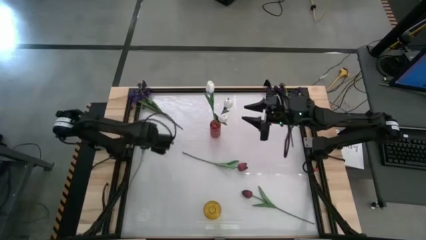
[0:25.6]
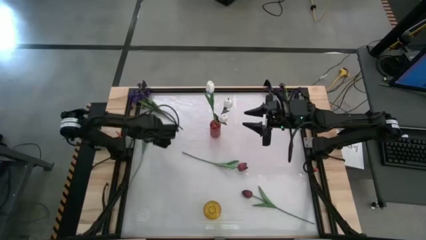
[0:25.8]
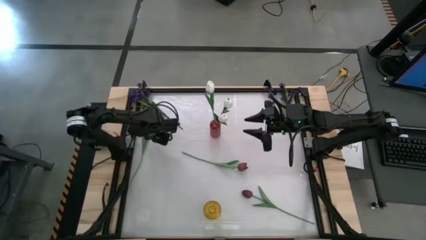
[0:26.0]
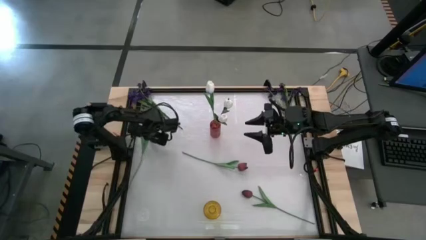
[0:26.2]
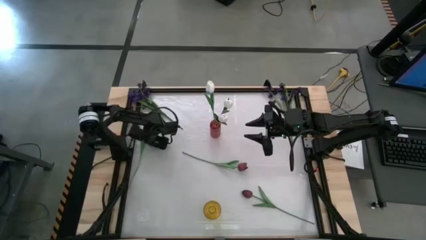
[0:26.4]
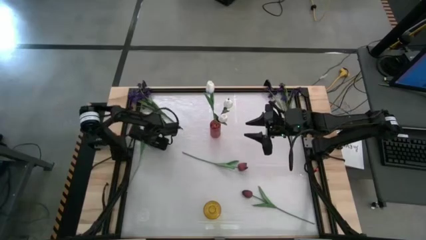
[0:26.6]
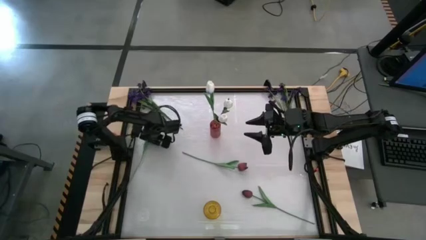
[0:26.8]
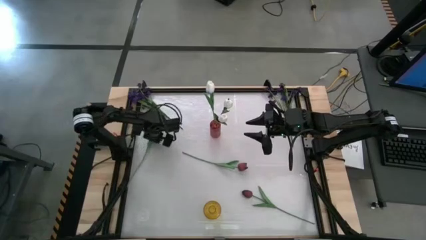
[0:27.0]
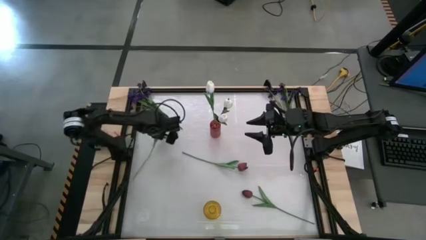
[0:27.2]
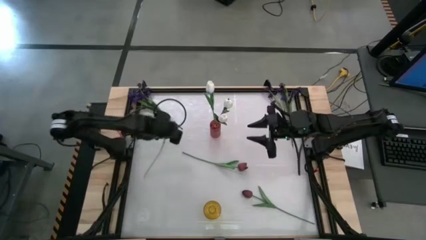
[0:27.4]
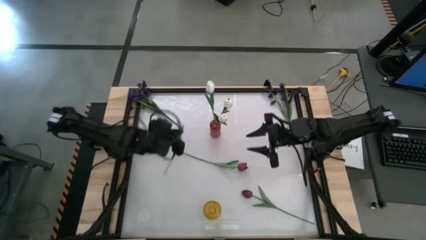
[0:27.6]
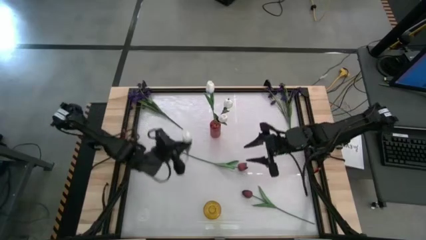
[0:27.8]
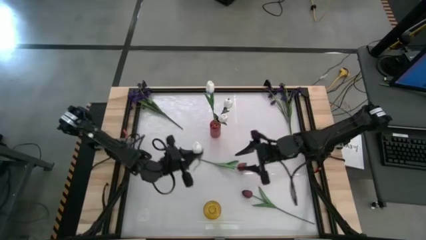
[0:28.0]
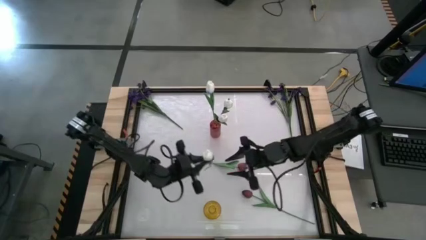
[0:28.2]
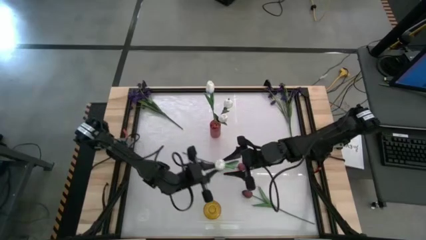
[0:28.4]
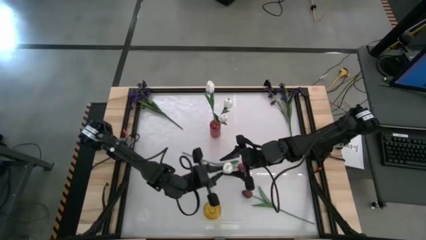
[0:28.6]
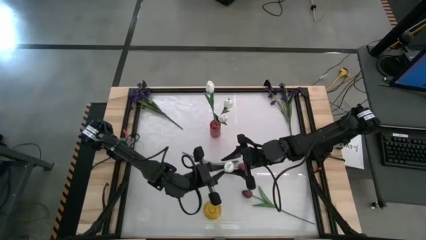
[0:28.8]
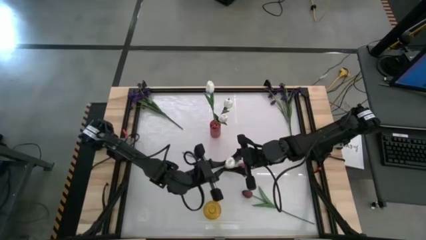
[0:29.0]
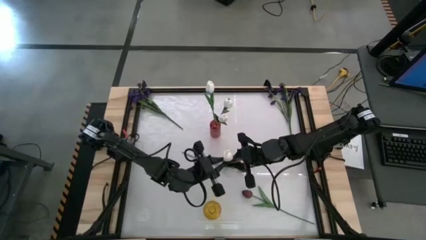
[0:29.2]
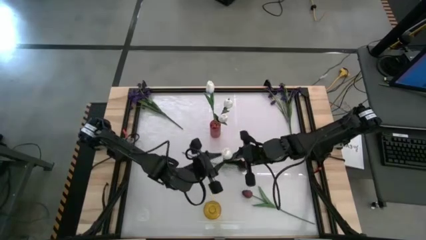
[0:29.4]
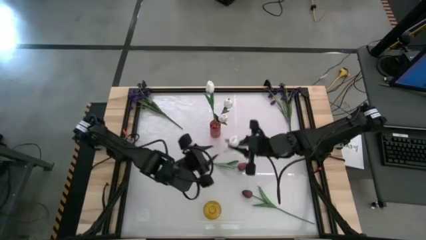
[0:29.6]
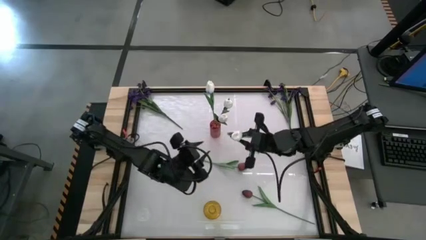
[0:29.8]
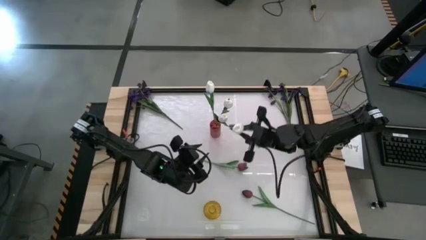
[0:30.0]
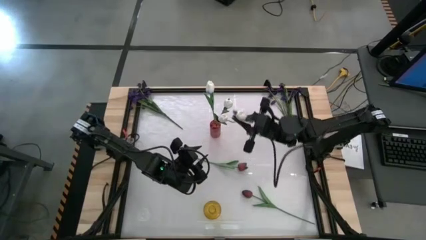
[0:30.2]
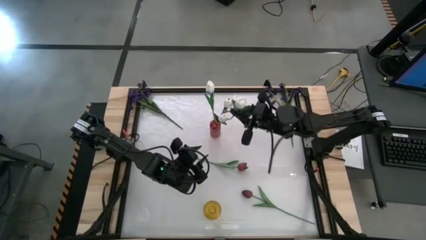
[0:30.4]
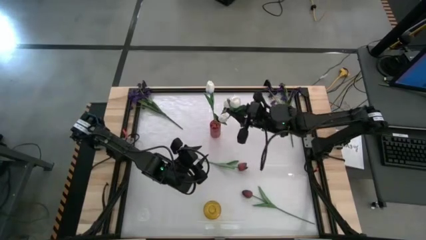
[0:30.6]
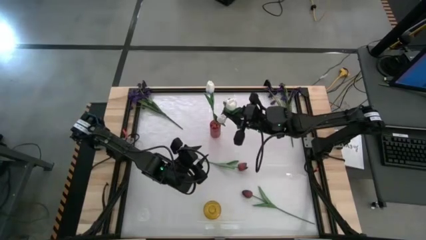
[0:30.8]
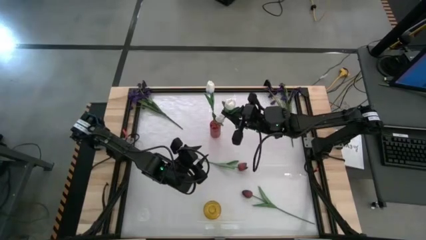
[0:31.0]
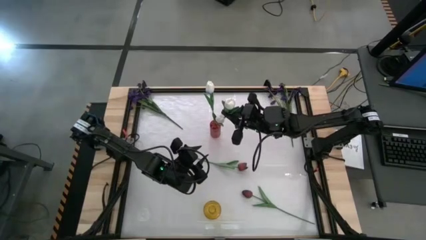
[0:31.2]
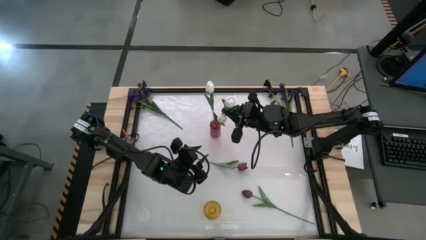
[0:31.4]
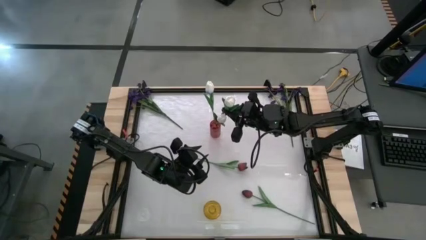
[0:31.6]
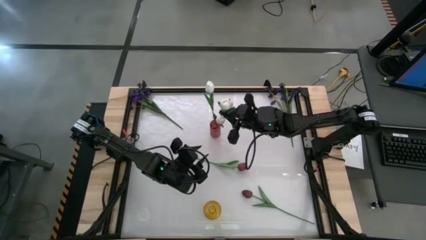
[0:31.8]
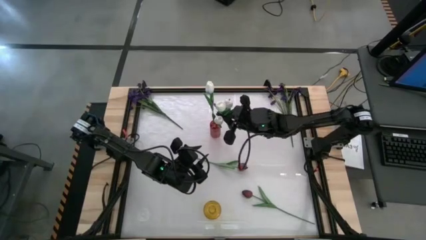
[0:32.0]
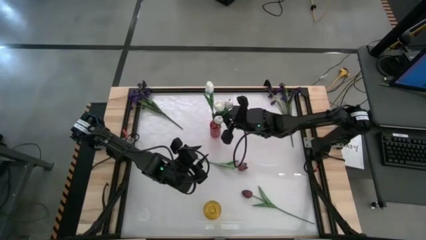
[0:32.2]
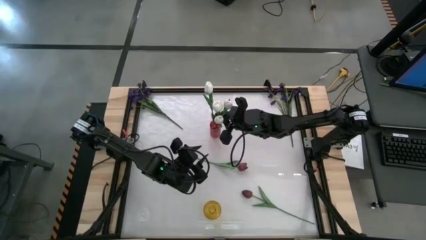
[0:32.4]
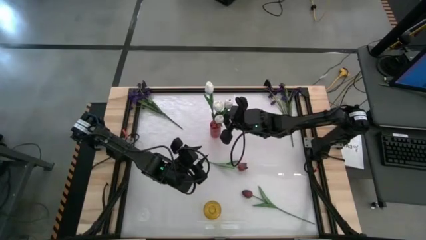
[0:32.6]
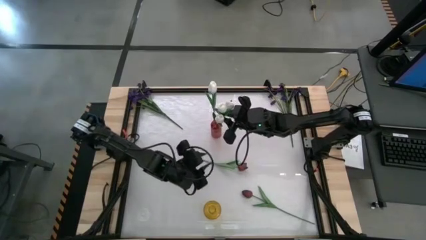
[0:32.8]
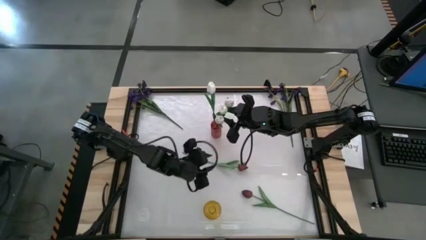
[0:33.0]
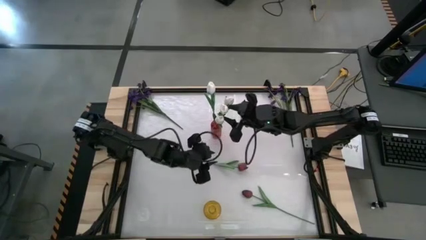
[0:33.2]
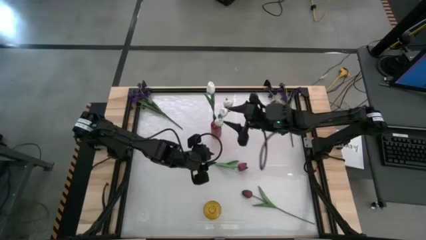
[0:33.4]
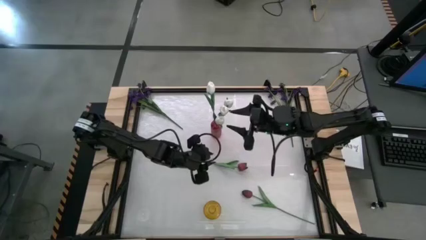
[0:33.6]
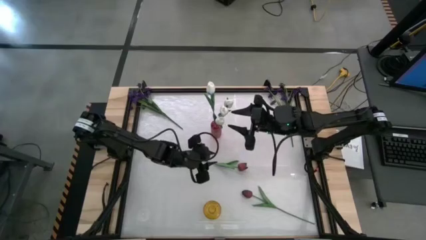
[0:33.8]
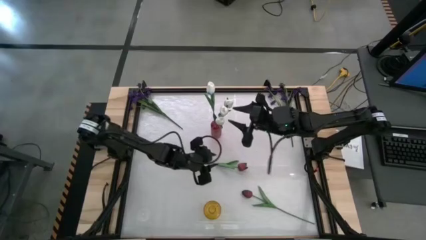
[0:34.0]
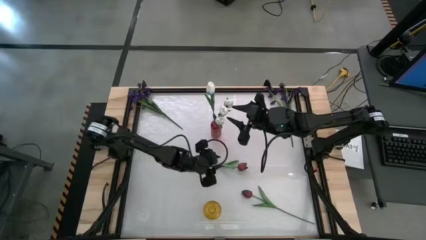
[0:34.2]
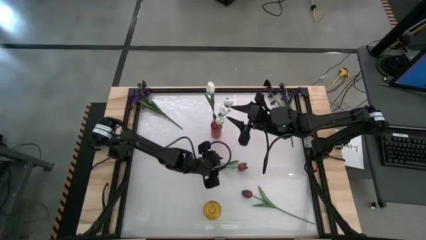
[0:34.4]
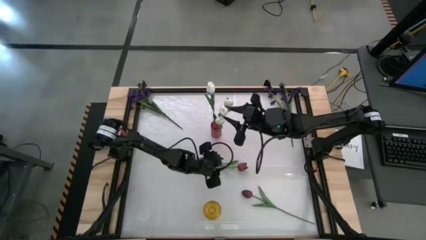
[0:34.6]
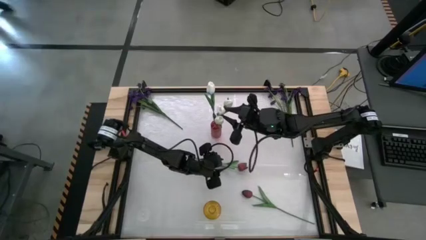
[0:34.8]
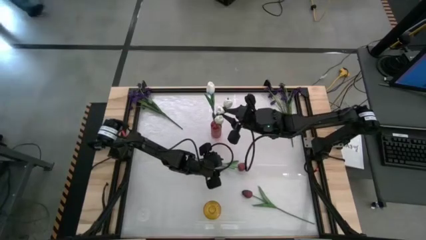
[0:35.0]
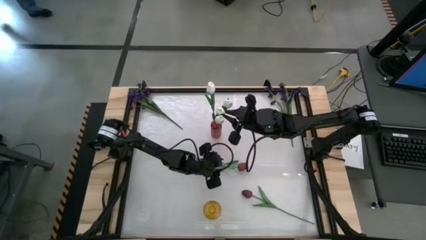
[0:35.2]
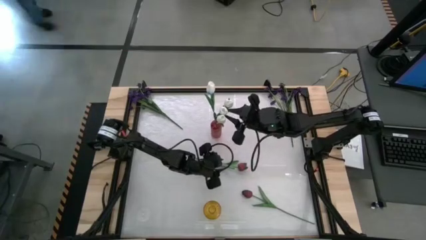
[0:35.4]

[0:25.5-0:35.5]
Task: Sort flowers into vase by color
Put the white tulip into the red vase

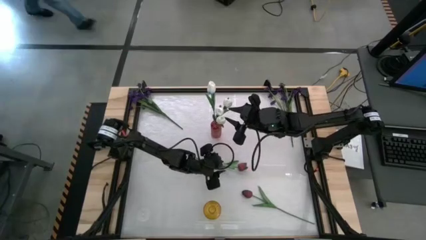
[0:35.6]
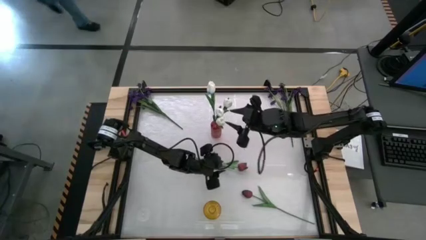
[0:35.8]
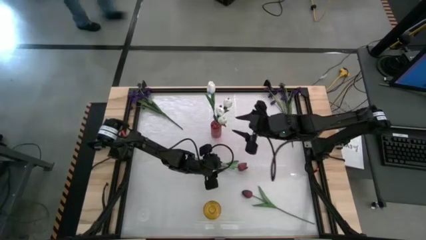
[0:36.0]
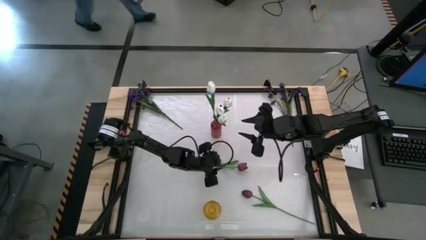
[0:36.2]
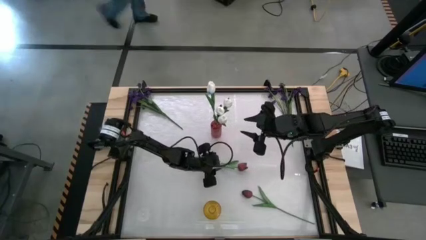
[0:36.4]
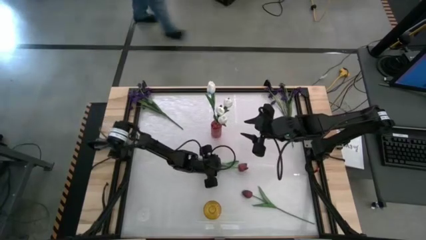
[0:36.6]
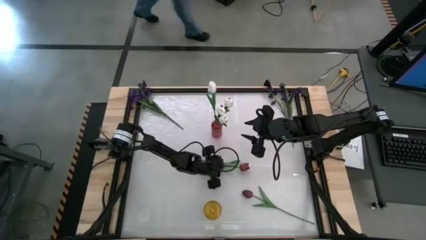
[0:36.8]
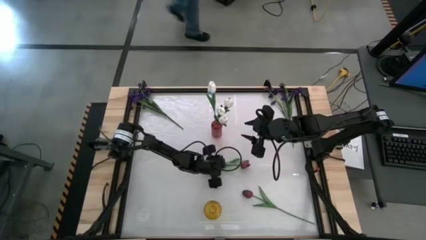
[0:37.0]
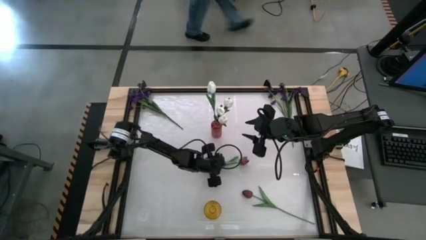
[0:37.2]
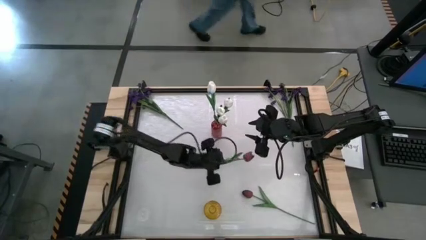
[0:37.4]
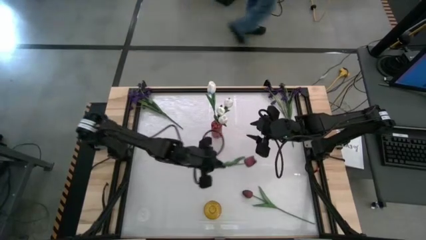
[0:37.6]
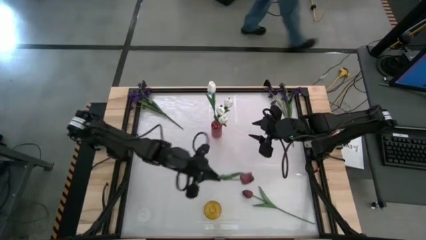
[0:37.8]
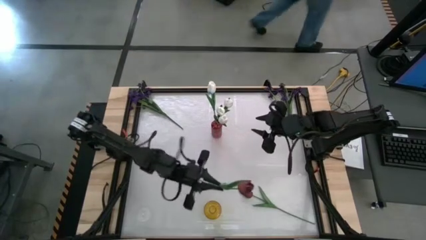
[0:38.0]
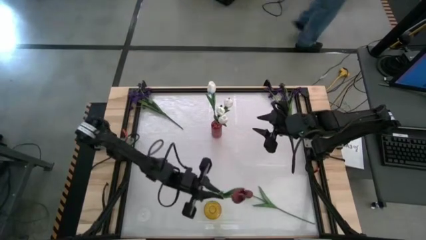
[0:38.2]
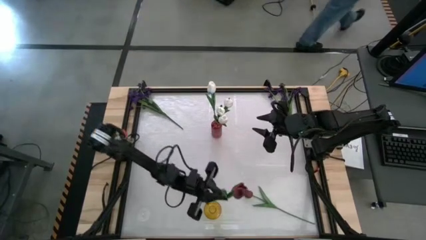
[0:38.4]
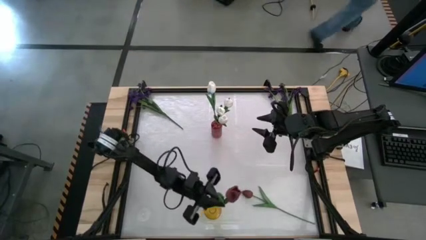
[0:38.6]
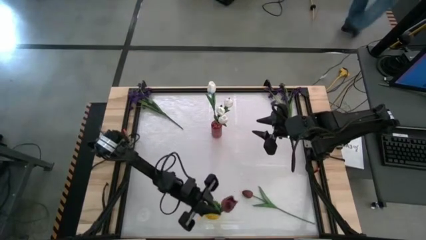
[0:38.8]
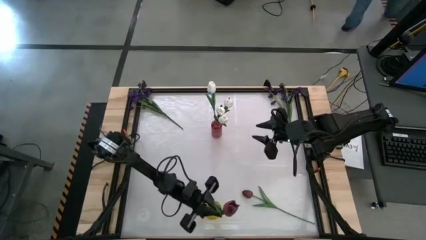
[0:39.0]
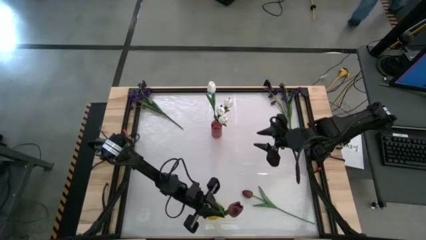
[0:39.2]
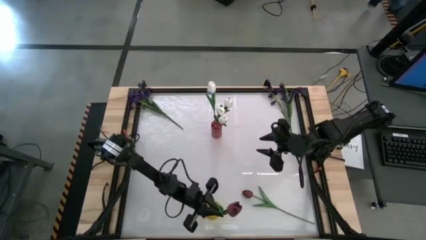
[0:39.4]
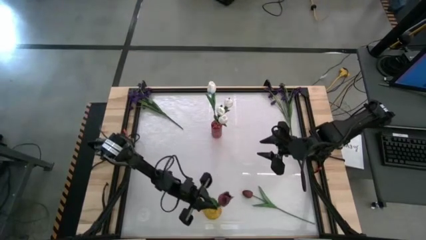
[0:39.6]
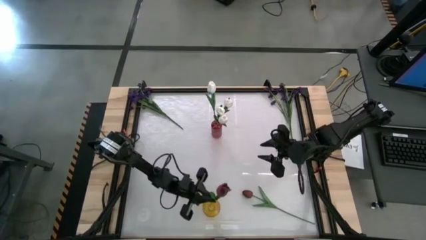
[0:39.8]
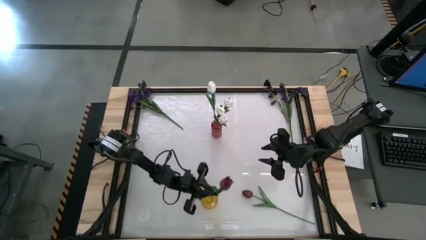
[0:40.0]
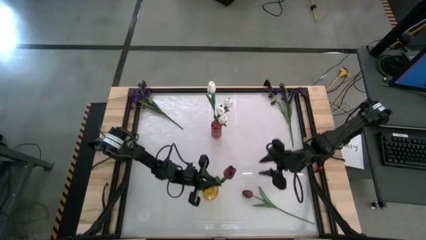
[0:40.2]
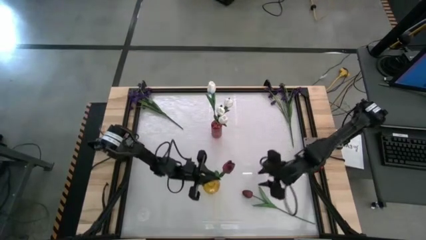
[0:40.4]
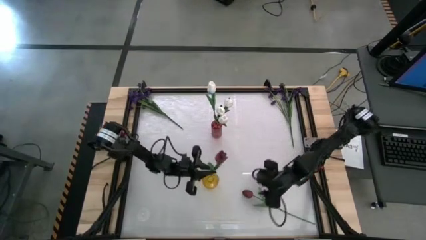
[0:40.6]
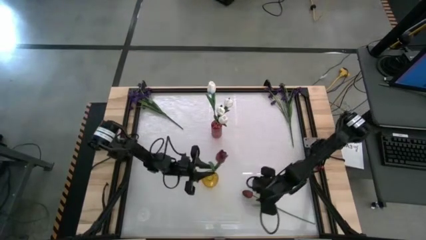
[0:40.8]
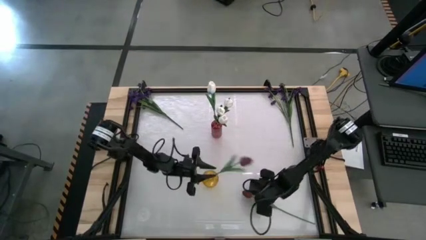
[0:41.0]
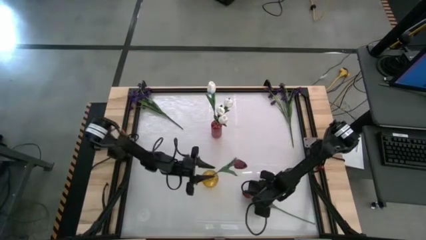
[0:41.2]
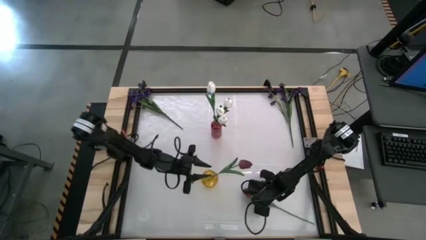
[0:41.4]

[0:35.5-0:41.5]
Put the left red tulip into the yellow vase

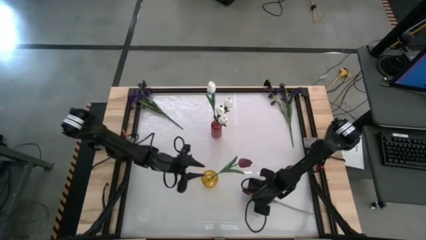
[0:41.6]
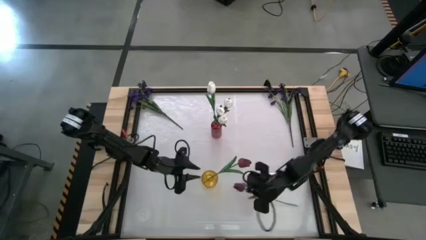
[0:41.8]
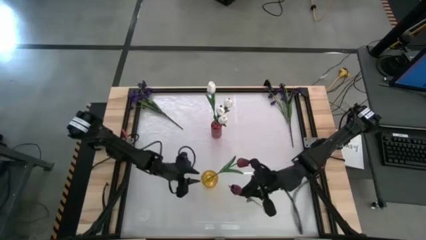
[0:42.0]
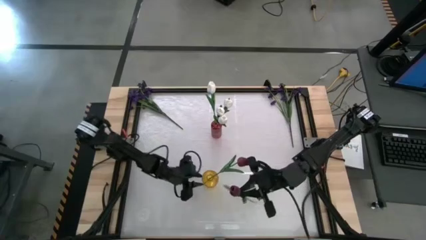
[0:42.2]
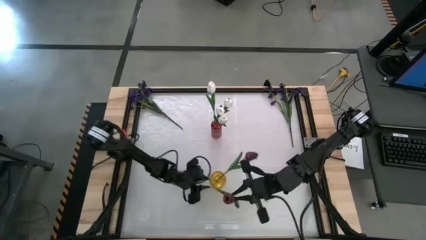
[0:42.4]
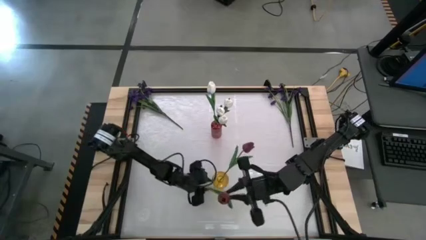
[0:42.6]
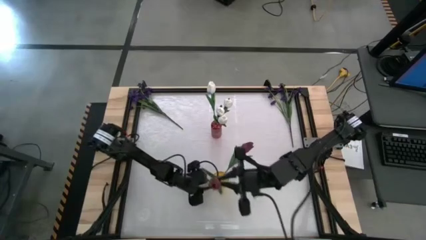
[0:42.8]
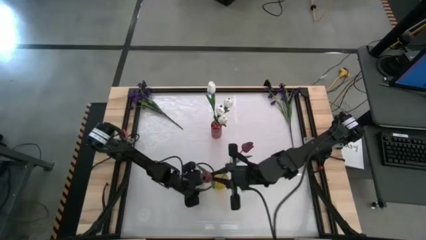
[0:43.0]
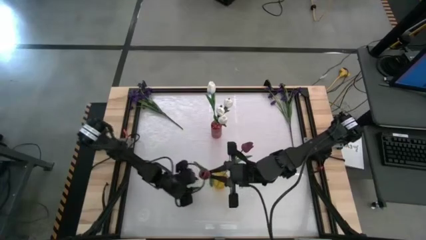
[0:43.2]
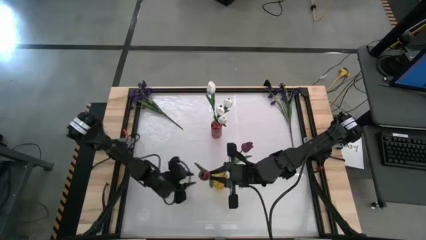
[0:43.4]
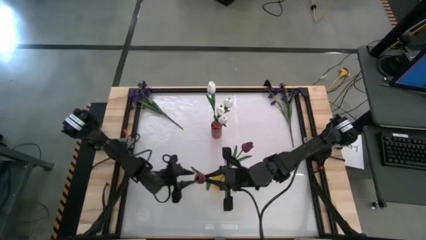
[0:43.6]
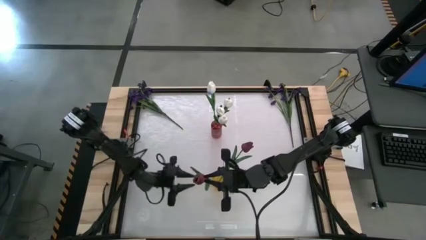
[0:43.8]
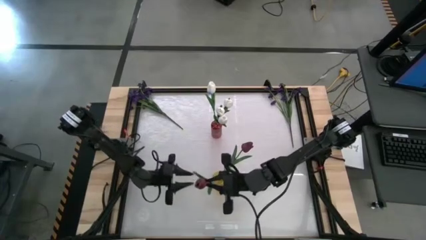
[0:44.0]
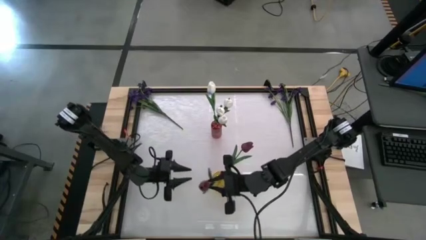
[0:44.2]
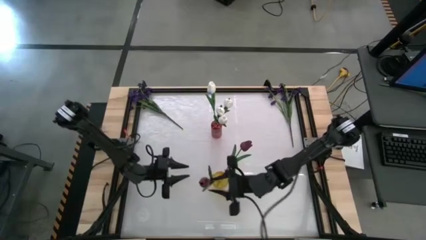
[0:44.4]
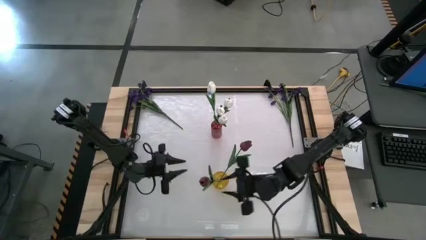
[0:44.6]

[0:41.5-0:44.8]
Put the red tulip into the yellow vase
